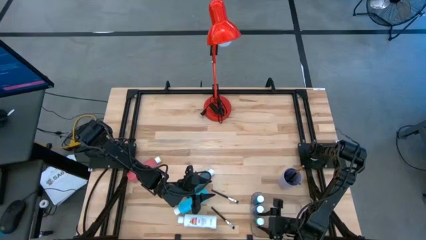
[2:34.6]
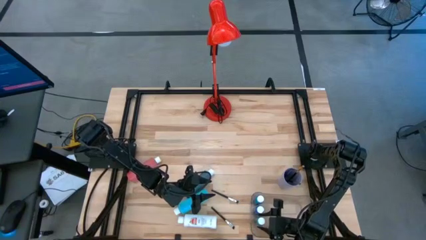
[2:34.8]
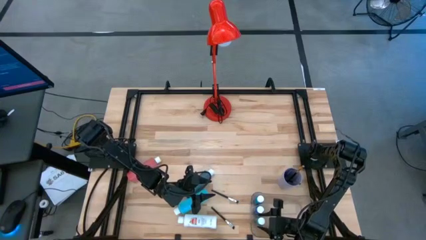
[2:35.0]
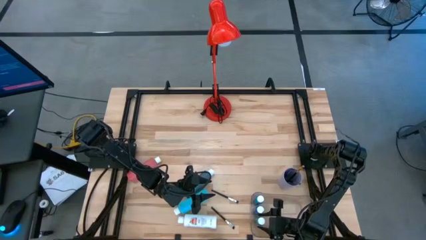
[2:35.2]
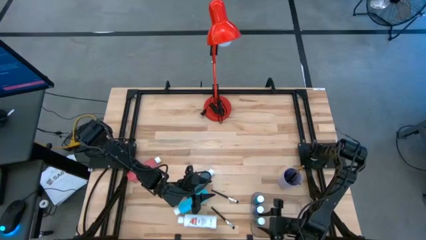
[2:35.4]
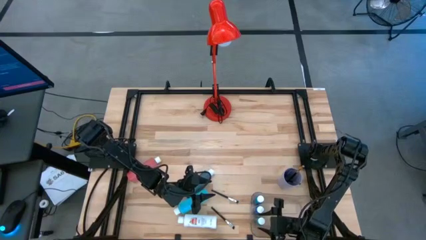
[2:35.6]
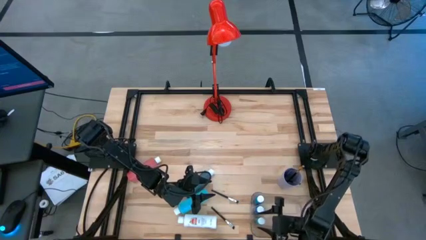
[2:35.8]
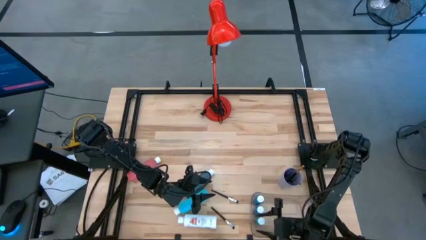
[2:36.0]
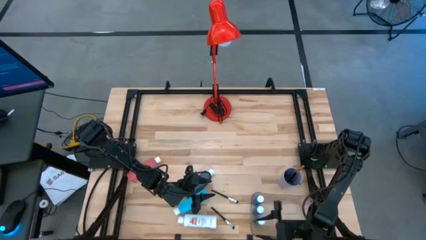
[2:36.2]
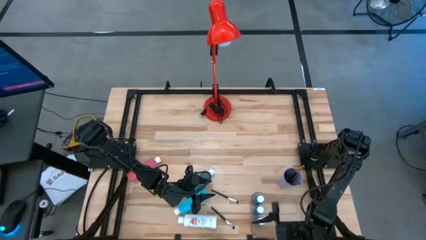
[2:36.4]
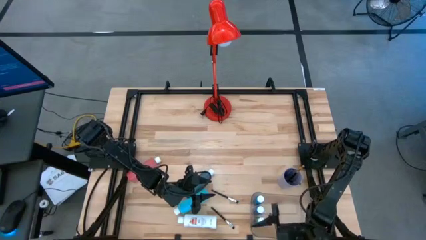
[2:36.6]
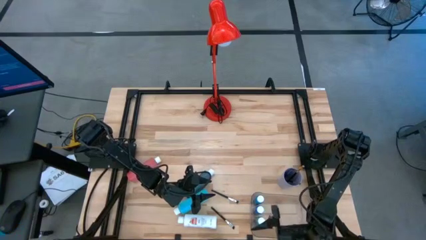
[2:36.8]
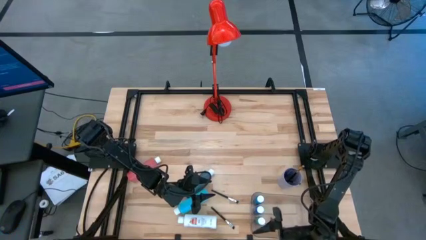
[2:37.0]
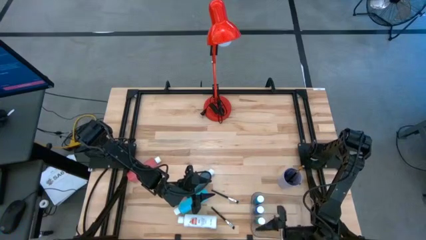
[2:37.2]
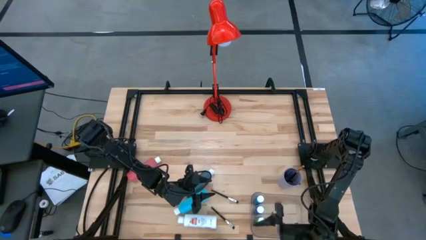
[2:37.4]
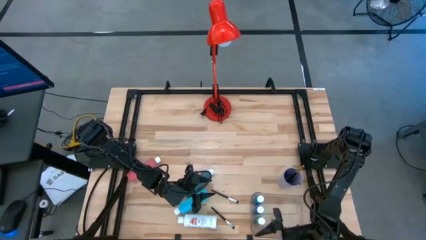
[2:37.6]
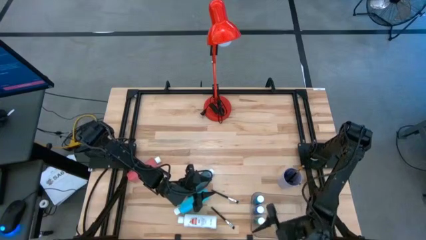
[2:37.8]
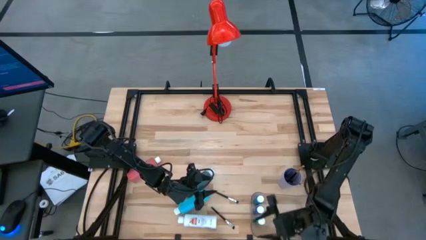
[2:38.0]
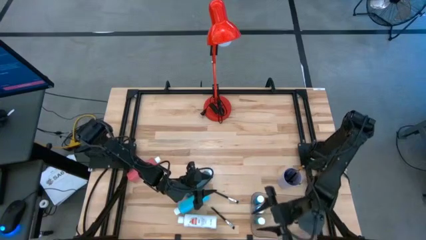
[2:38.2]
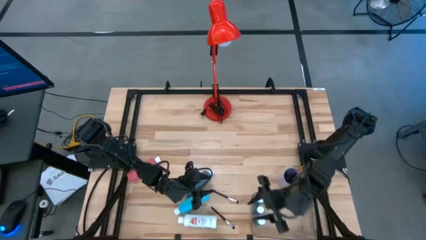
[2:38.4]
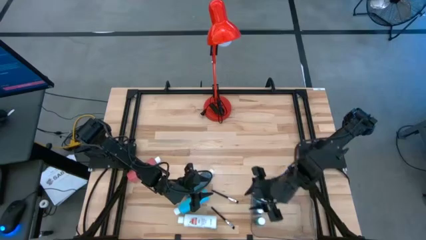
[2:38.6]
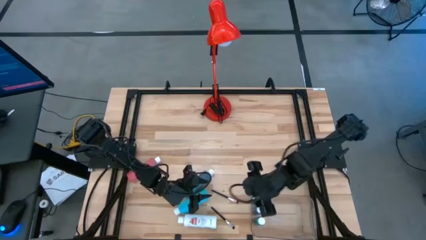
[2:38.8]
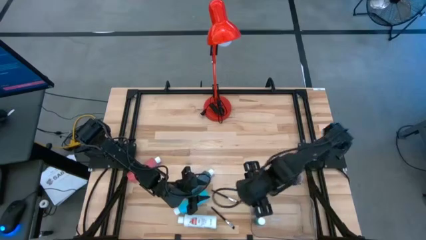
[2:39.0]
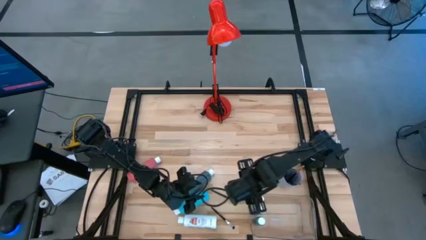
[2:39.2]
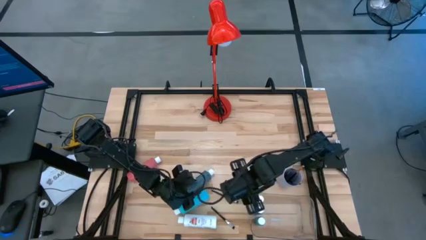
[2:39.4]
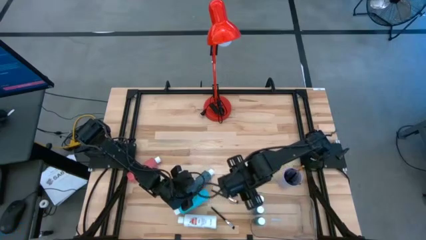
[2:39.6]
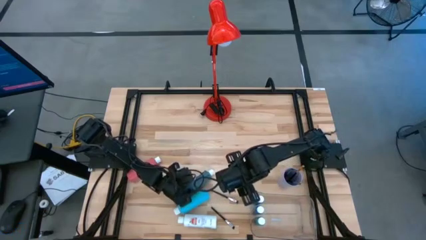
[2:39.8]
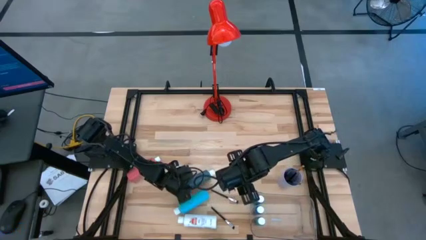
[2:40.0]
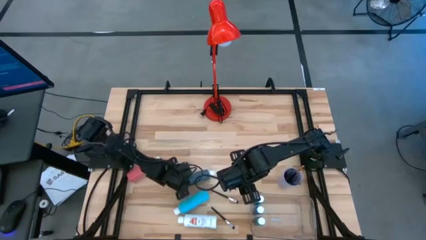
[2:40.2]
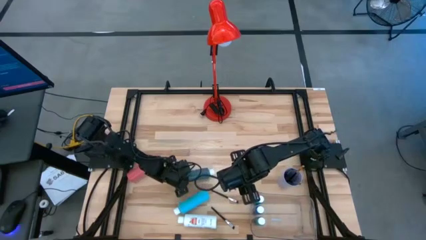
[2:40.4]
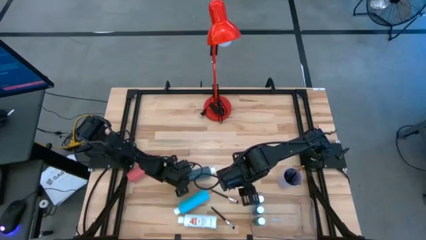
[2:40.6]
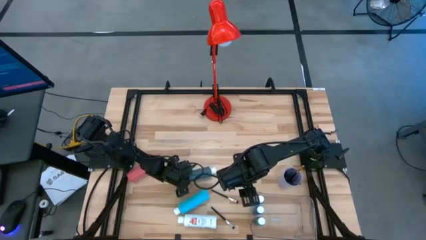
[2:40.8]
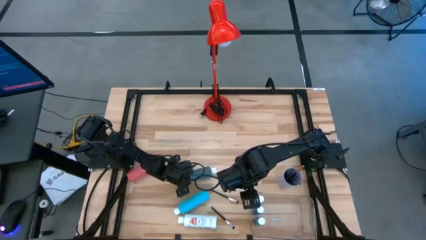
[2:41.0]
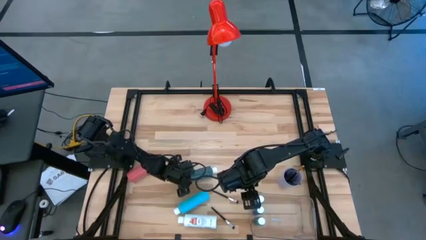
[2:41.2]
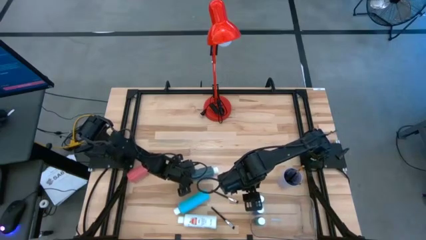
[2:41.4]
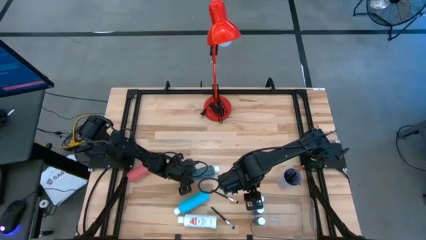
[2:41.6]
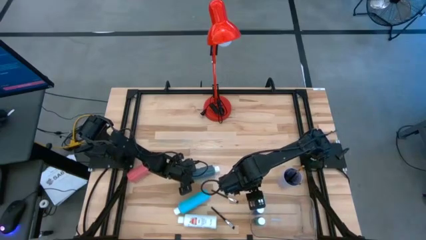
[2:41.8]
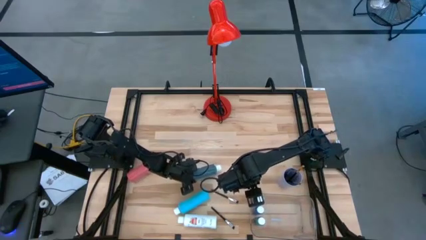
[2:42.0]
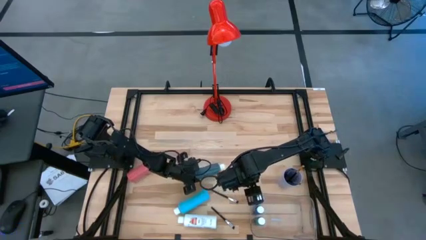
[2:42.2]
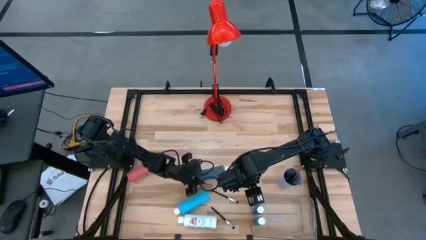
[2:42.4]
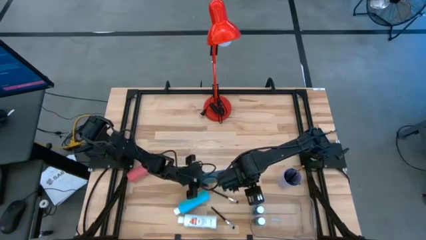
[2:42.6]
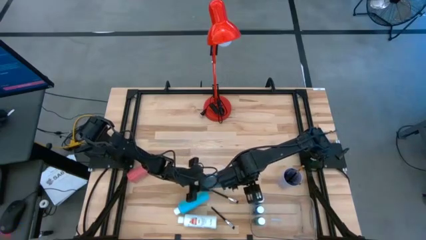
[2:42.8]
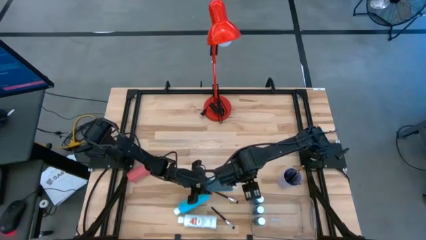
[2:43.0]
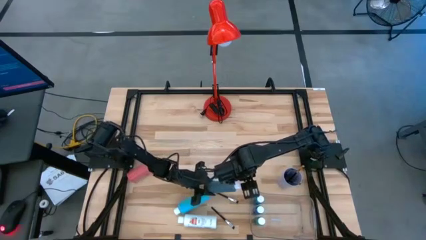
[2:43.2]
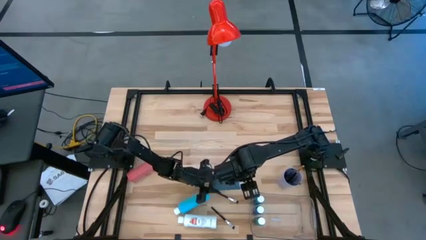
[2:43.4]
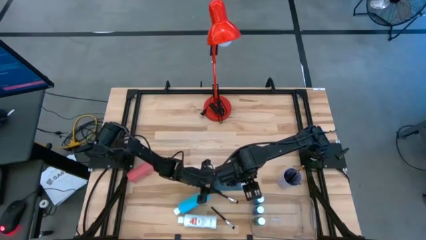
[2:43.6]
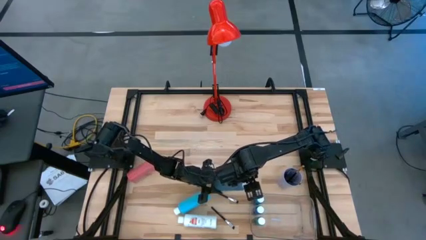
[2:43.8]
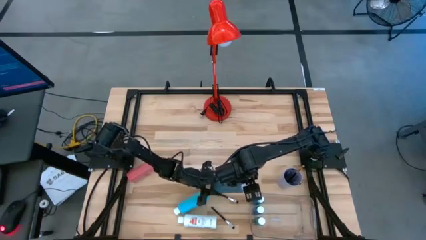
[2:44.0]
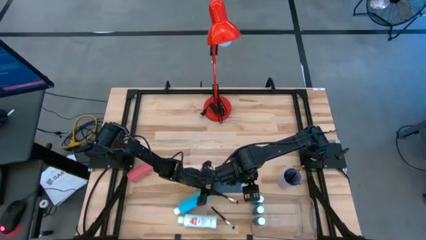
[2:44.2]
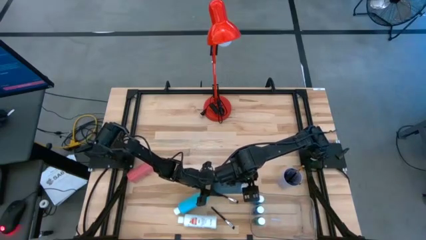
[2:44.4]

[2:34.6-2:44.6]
Task: Pick & Place Paint Supplies
Put the black paint bottle into the transparent bin

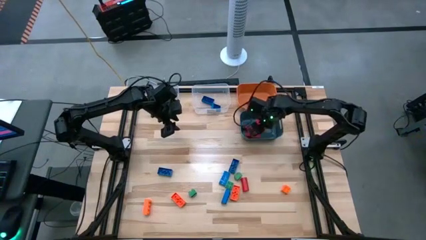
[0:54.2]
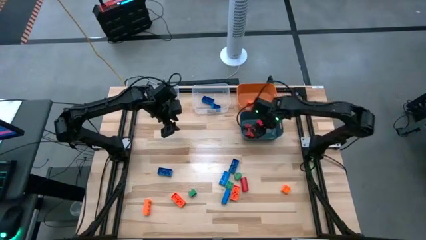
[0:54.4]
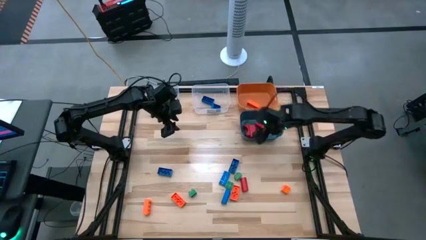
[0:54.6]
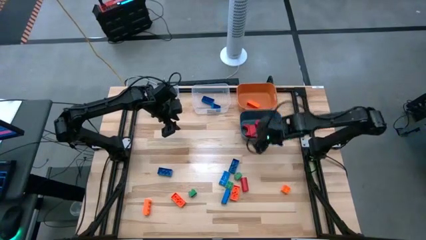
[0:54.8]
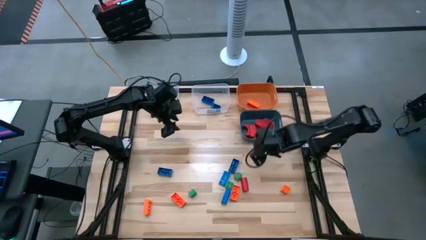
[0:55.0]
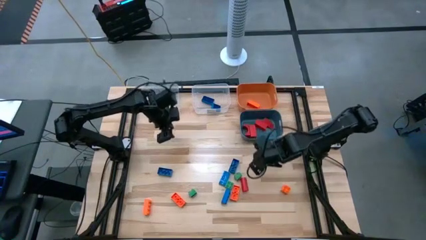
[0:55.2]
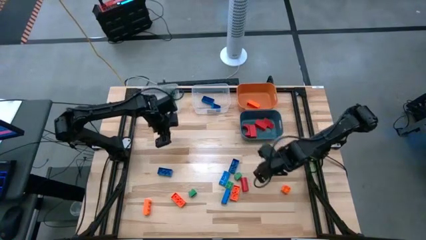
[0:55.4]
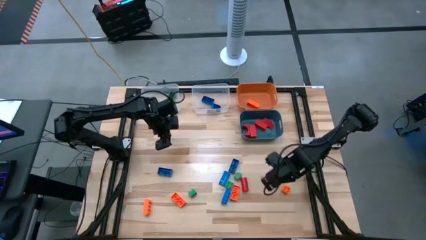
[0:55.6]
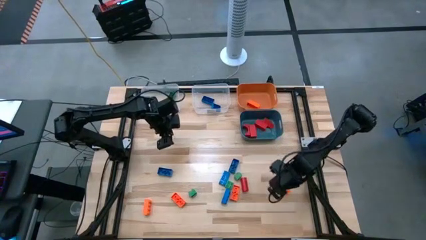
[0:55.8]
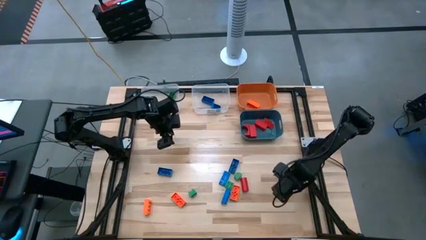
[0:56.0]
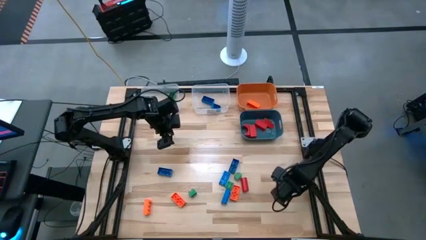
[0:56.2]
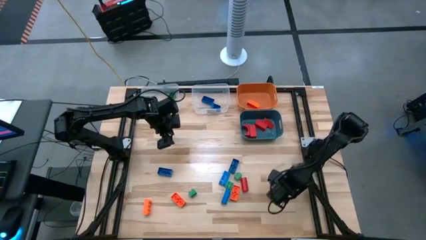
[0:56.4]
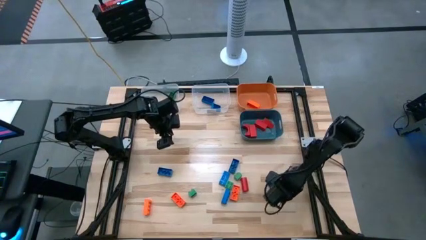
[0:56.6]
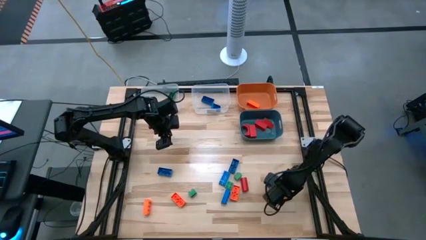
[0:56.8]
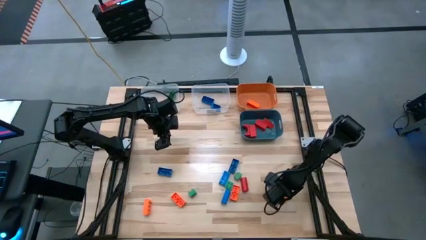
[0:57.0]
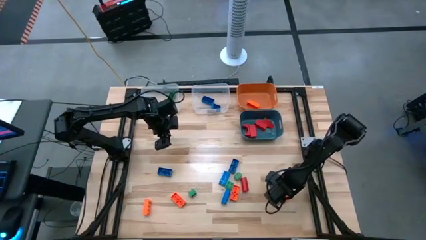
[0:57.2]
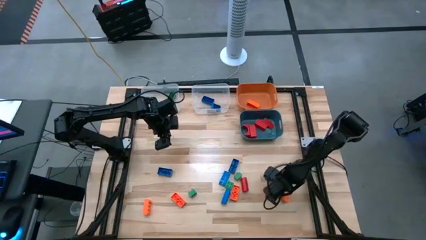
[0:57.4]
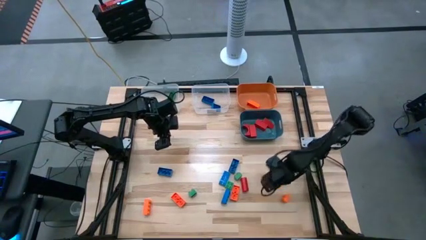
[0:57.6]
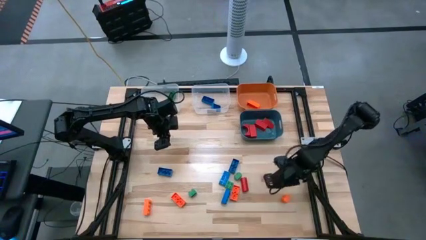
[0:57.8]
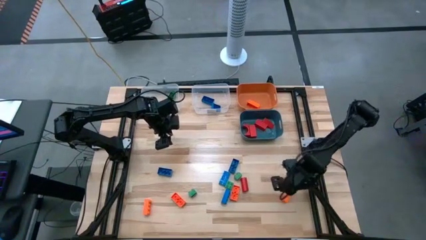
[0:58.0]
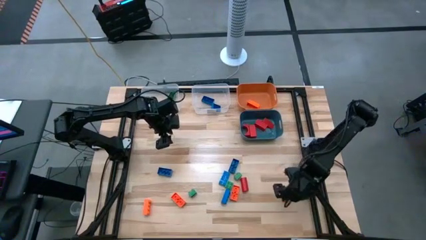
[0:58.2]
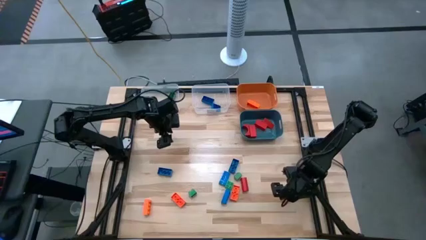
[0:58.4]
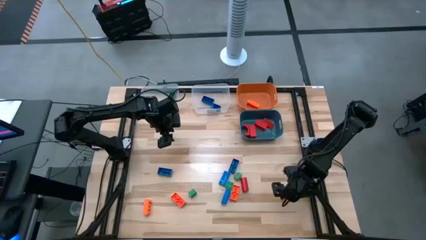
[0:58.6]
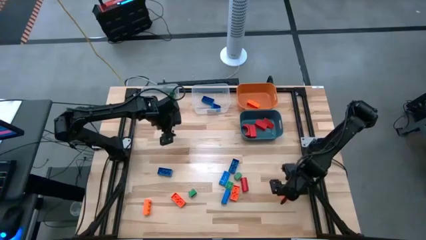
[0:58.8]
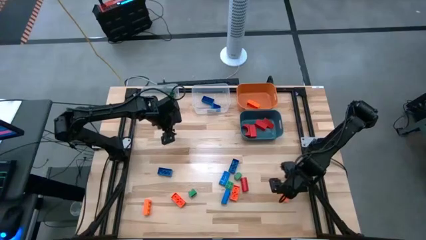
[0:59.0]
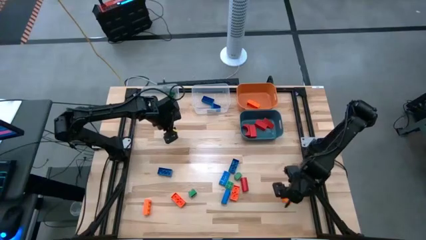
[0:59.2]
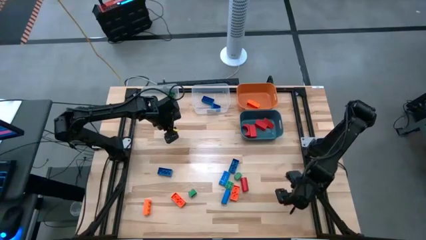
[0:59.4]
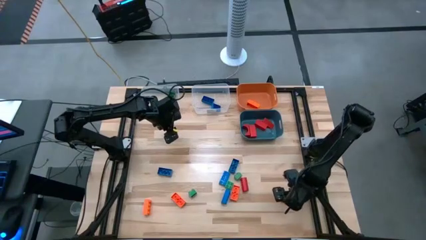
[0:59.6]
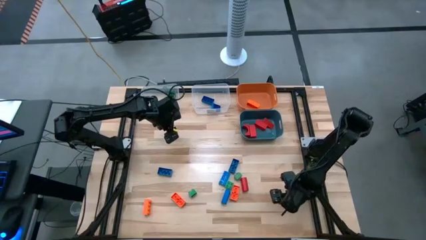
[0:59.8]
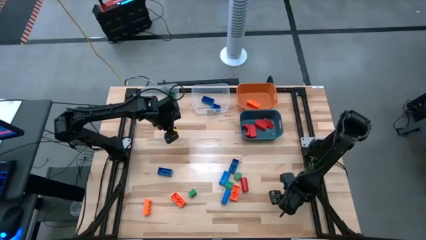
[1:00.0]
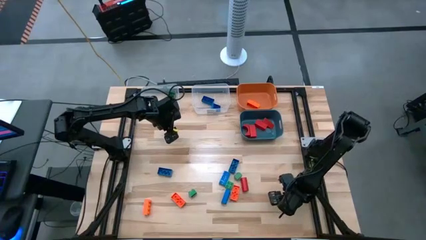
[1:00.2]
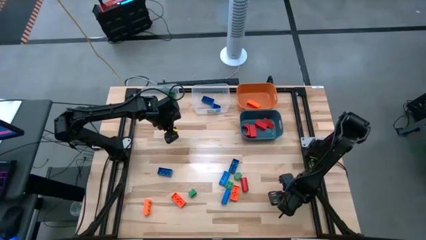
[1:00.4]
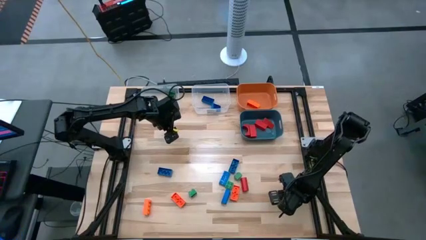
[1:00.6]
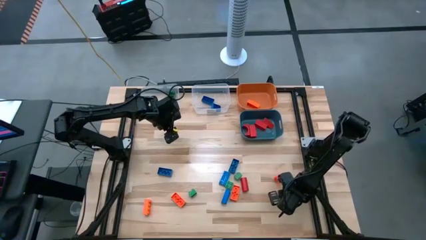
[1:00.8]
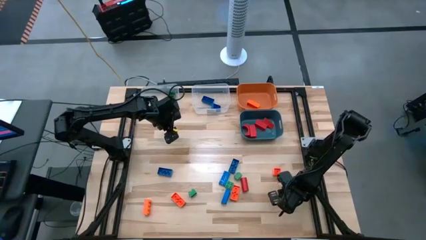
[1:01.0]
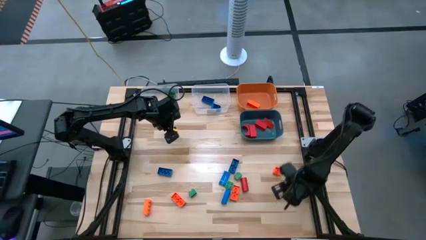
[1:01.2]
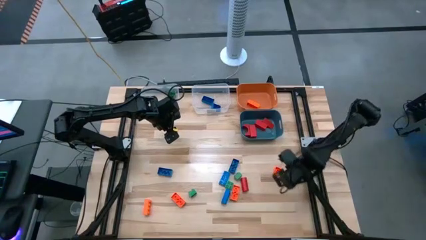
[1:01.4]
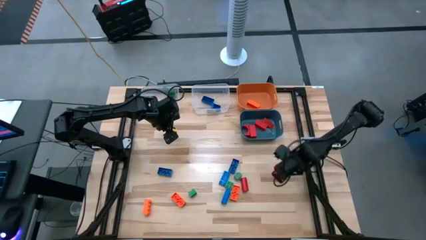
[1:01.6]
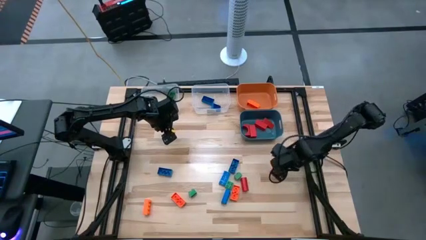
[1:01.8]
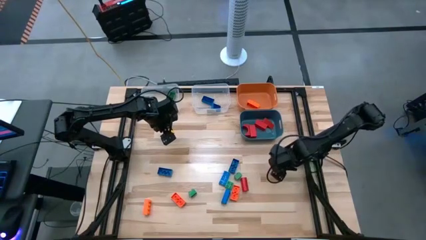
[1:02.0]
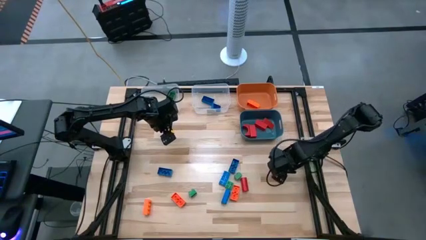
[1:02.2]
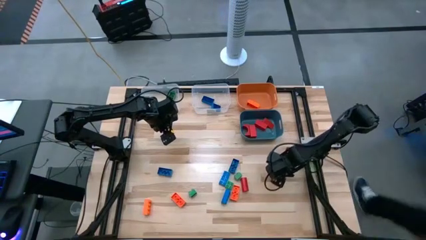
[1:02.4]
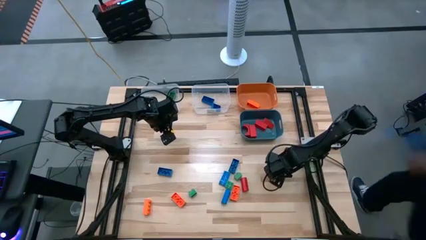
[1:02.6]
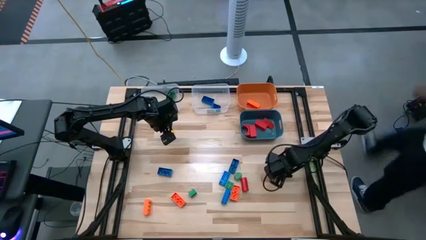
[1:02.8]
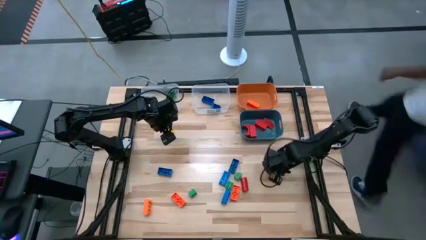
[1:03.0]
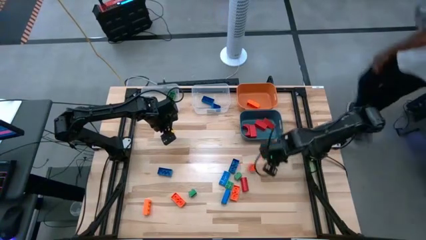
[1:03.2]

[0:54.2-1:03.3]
Task: Sort blocks
Put the orange game piece into the orange bin
